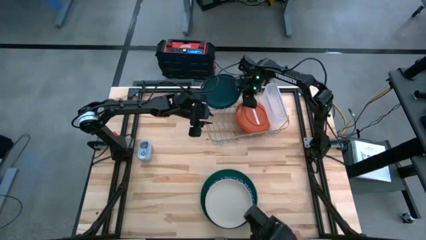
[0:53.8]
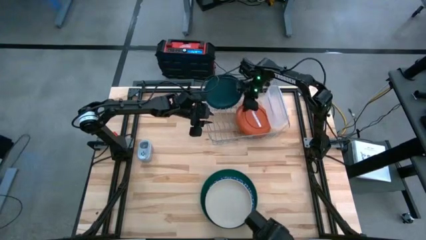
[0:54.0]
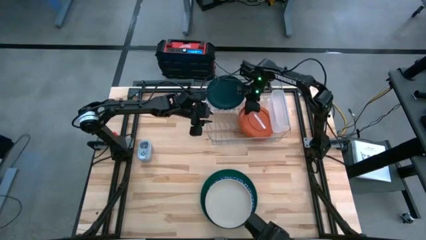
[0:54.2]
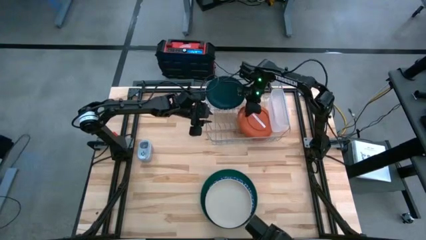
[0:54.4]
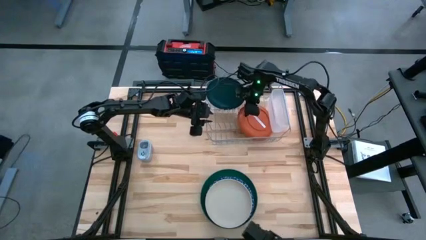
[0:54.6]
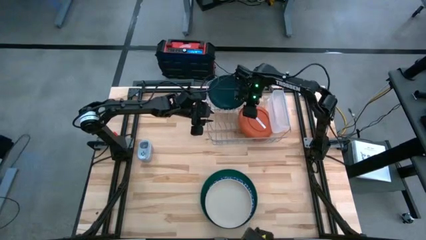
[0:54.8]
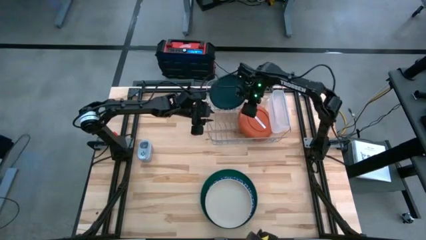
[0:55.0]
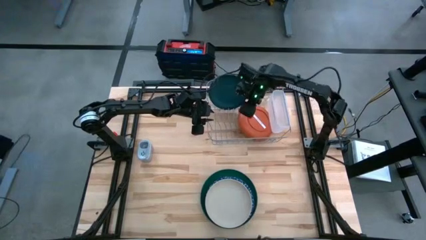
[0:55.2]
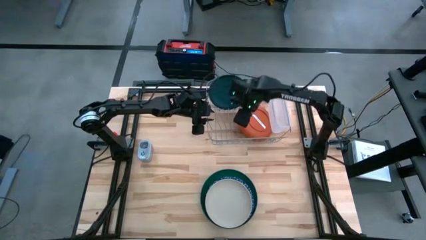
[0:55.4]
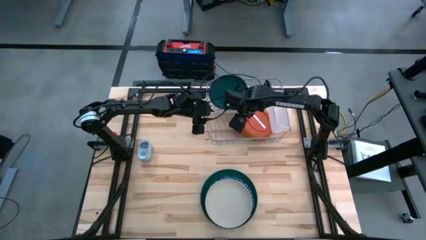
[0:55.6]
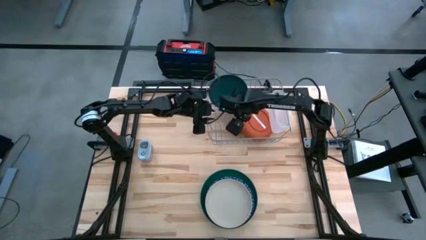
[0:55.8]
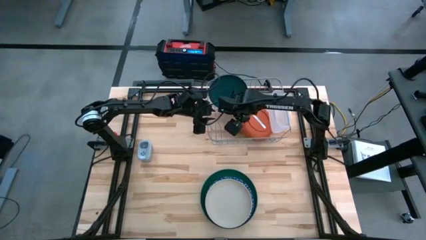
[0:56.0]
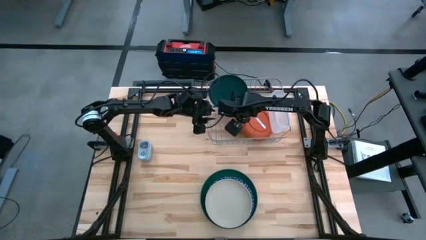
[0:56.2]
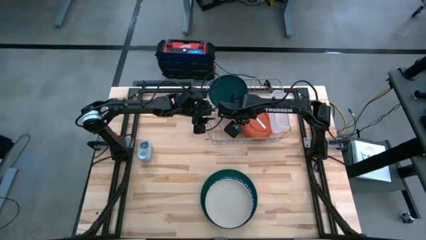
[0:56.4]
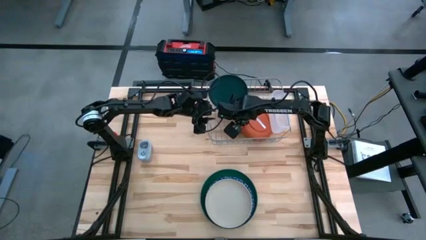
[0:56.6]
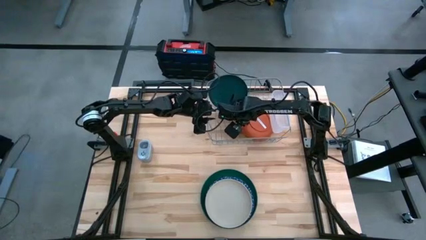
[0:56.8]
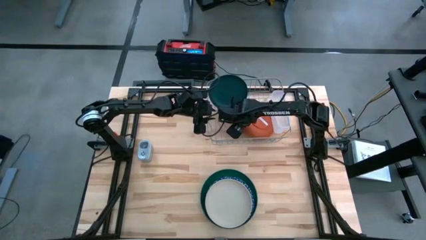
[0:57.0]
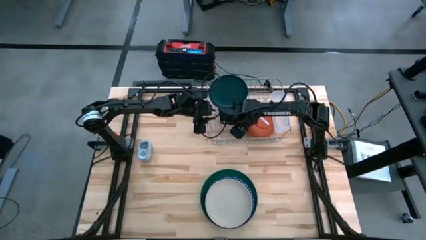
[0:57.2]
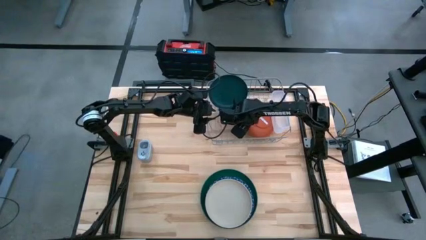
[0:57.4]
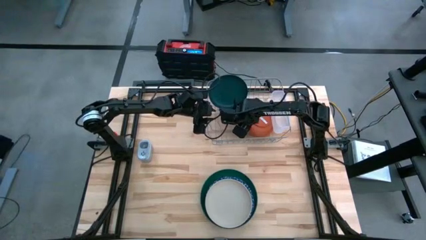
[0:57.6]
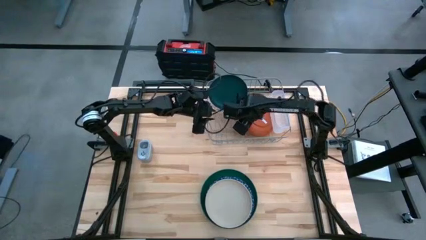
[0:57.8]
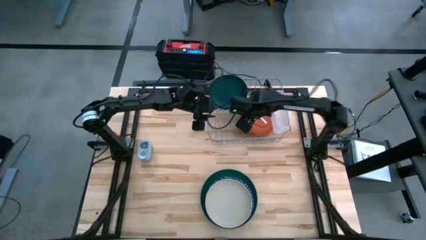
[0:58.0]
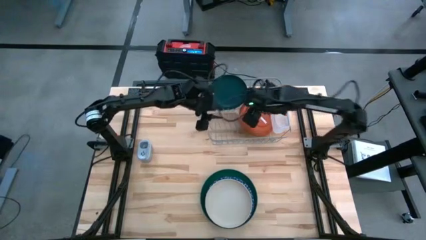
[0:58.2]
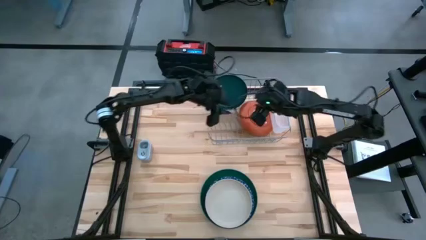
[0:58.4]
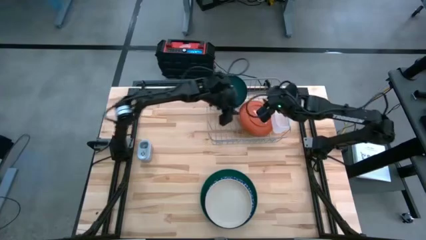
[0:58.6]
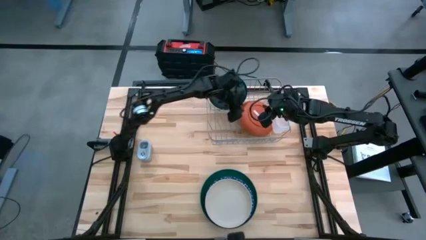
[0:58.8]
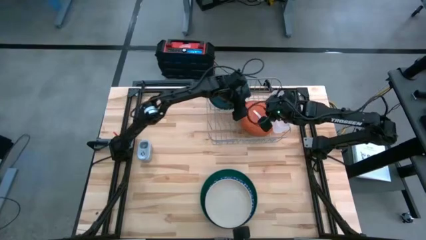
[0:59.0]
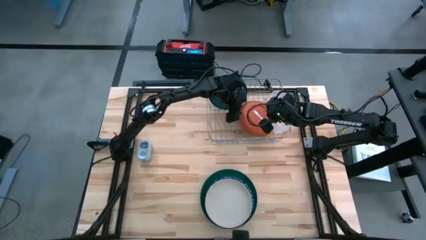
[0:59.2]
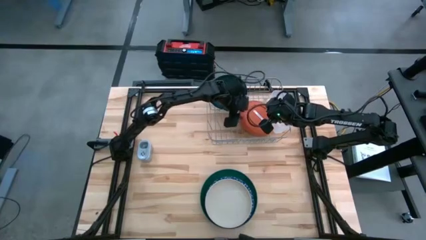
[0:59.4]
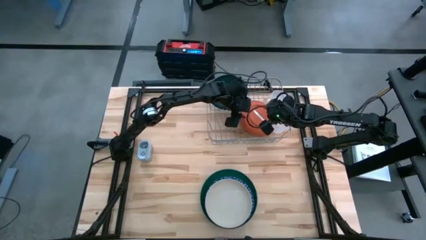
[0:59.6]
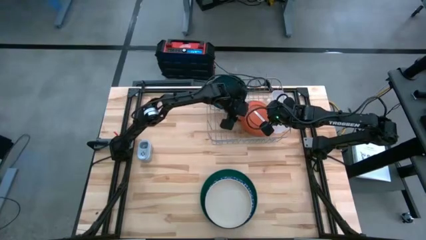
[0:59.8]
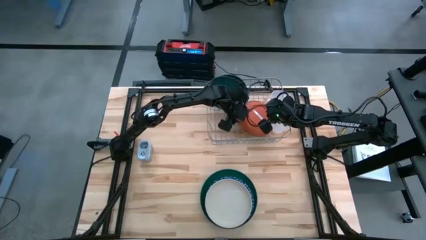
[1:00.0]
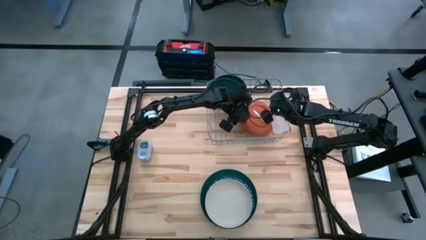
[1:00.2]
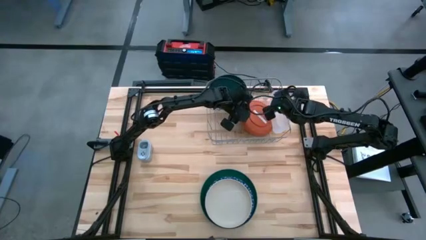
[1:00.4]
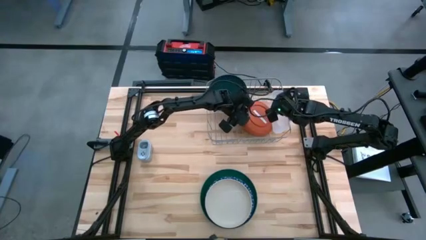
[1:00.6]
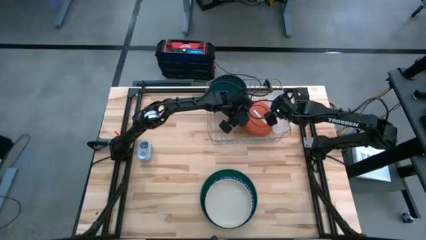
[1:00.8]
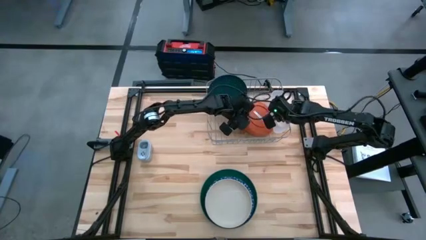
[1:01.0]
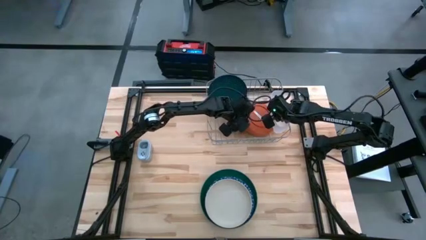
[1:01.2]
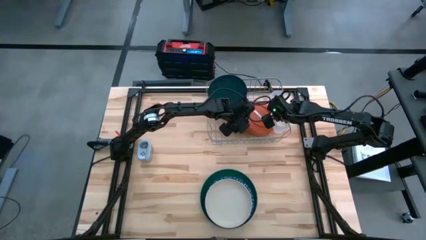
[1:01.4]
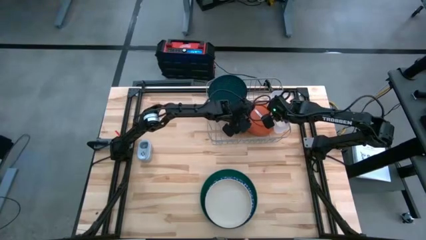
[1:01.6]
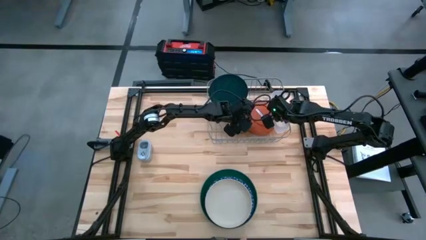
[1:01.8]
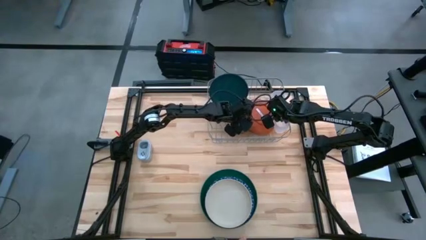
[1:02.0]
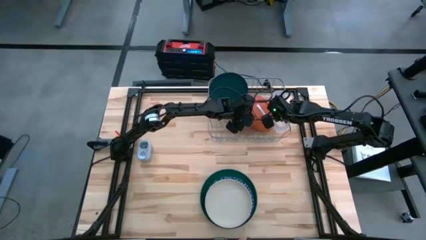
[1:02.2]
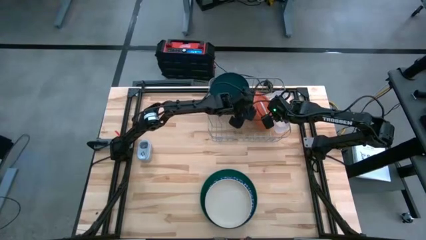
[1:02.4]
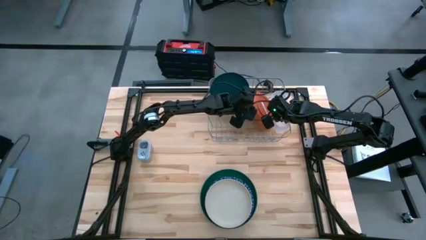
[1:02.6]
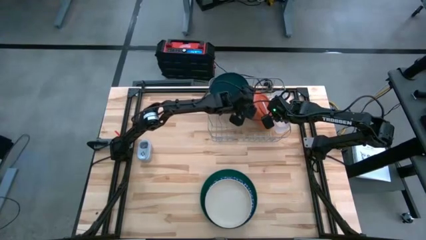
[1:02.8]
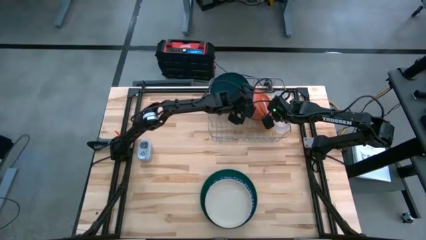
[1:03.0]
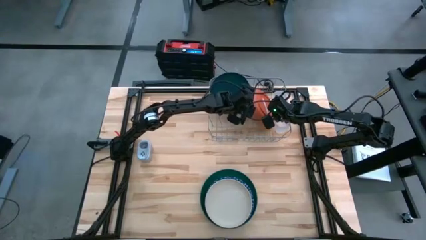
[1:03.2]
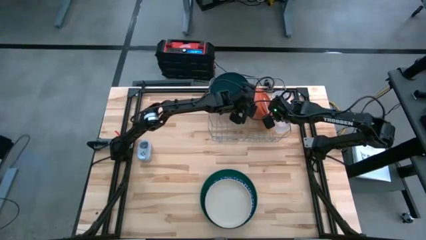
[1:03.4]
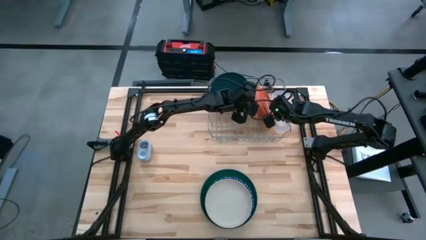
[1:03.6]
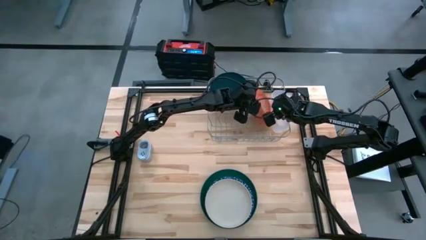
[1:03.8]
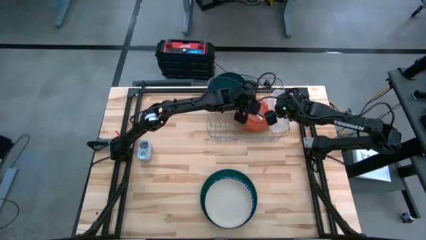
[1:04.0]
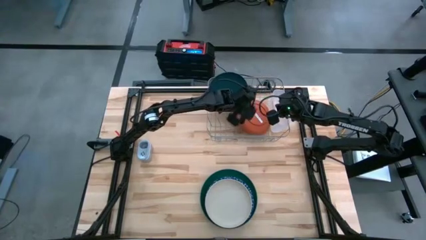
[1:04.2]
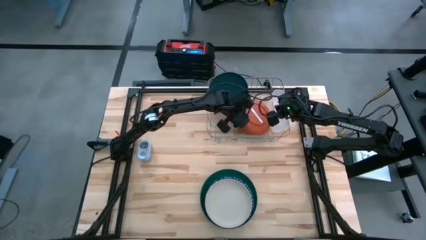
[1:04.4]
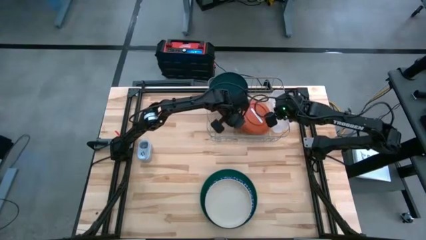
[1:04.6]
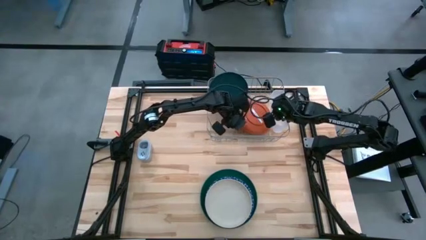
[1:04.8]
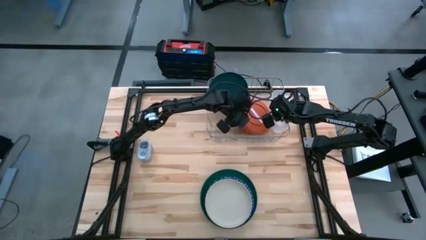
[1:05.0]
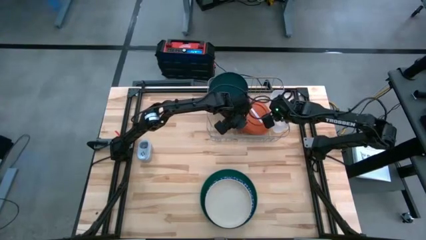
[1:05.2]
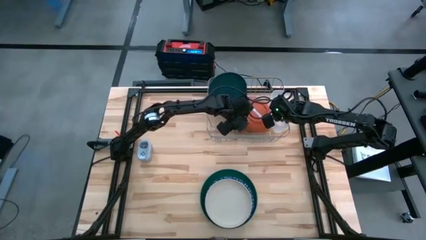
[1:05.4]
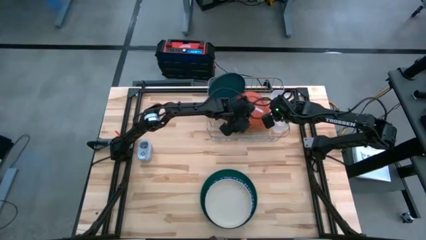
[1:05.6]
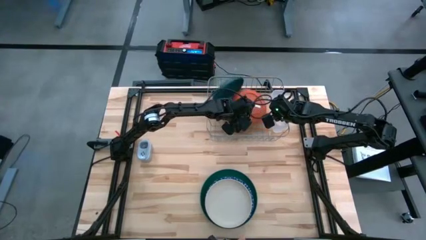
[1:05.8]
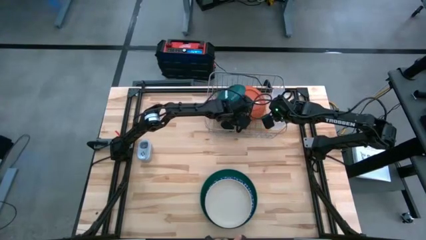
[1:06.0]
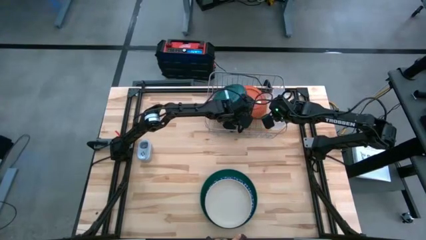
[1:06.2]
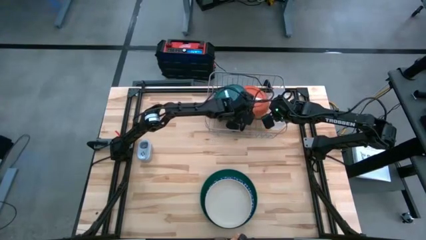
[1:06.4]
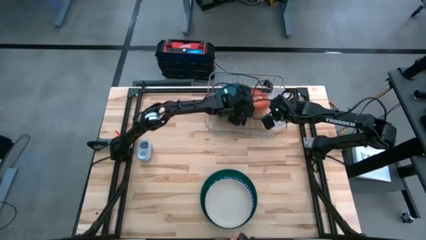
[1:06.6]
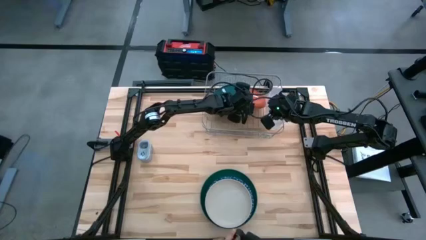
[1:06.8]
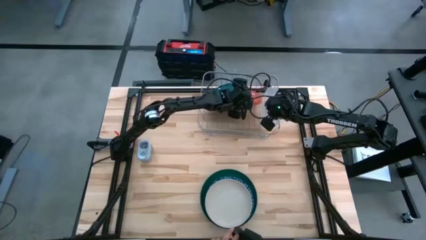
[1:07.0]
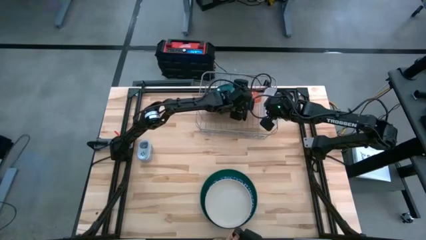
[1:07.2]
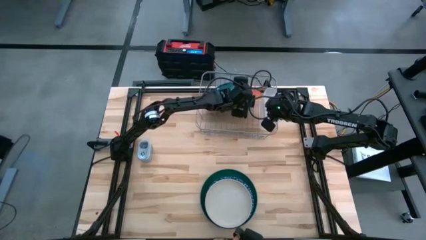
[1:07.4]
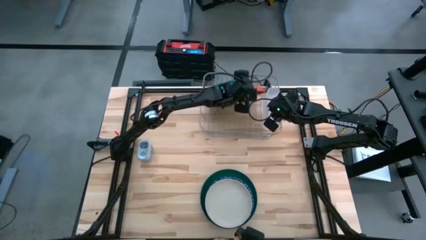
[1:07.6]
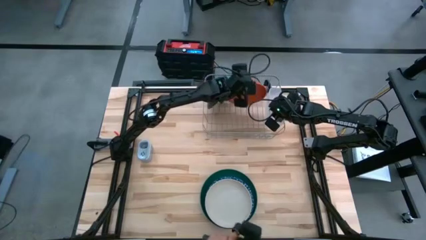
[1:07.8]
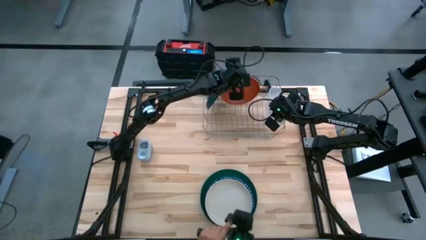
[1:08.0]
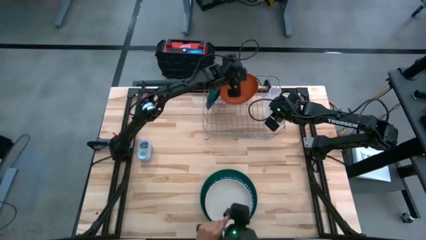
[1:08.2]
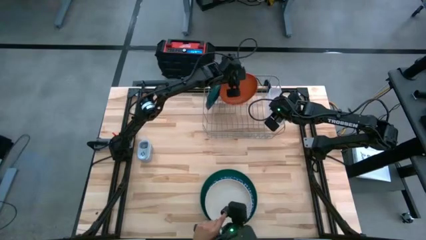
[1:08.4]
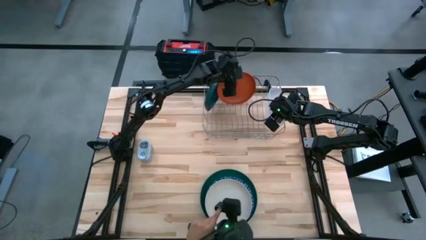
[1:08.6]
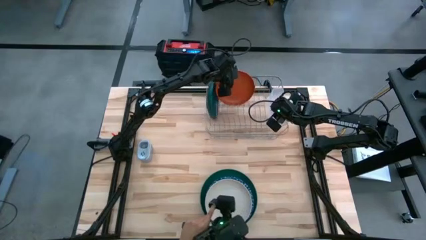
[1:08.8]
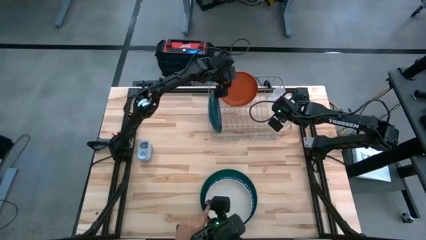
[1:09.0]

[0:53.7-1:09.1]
Task: Sort dishes
Put the orange plate in the dish rack

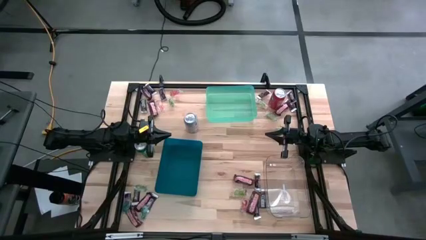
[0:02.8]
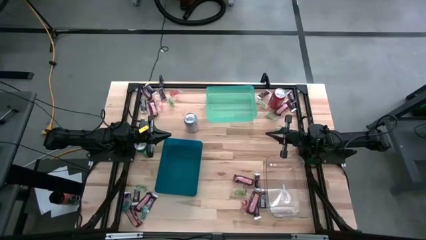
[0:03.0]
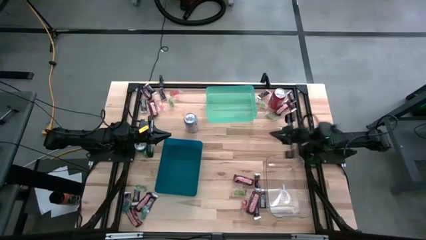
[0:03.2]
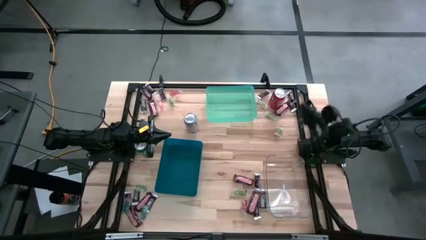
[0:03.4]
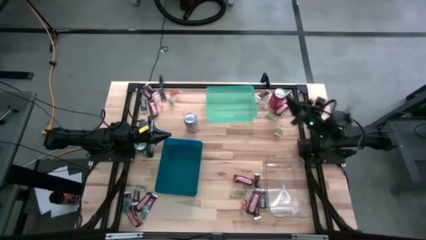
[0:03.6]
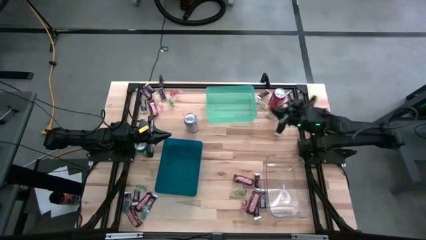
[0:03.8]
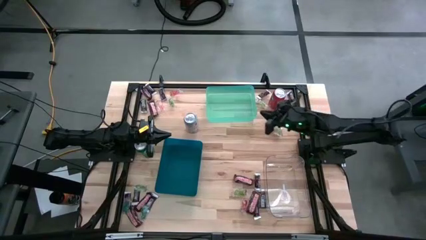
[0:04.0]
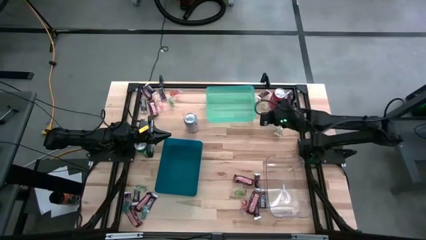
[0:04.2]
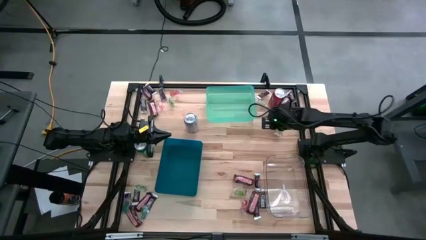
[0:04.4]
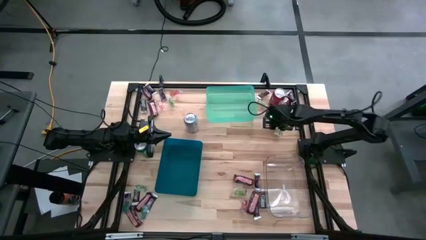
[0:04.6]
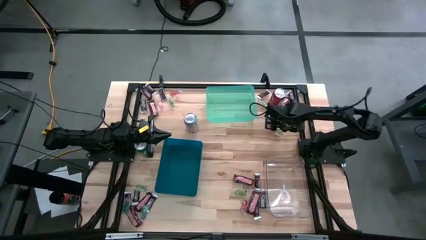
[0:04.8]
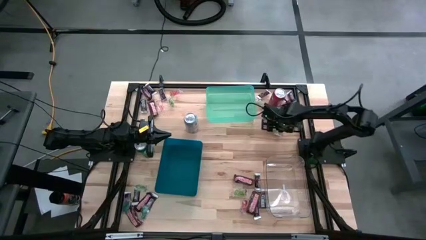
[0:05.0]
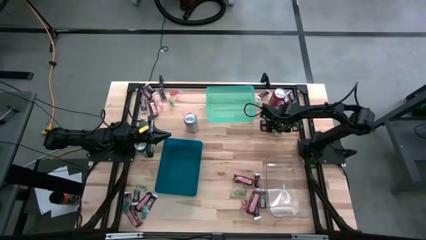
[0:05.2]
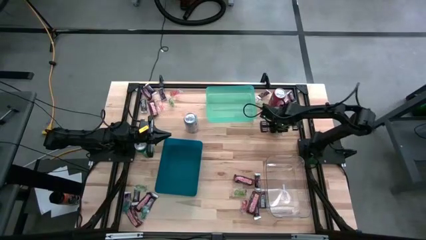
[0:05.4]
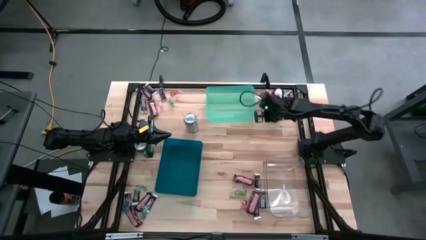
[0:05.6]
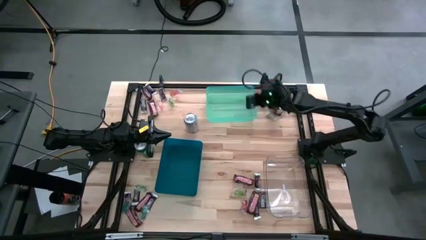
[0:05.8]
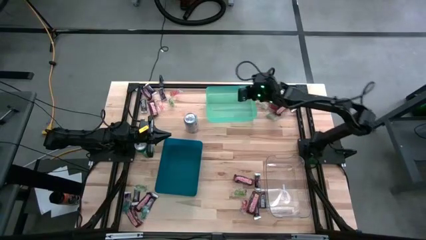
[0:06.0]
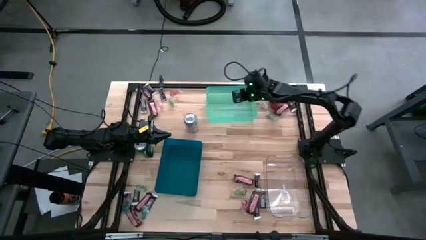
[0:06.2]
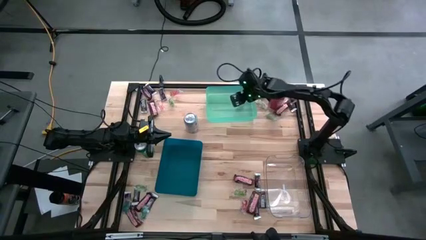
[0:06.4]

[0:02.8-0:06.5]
Task: Organize candy in baskets
Put the transparent gummy into the green bin
